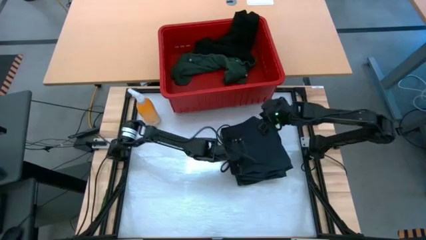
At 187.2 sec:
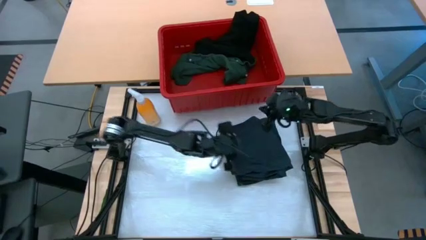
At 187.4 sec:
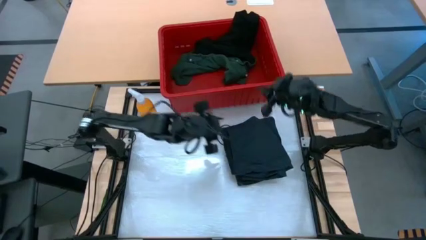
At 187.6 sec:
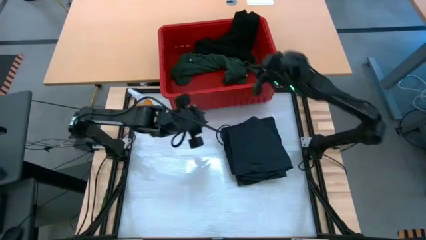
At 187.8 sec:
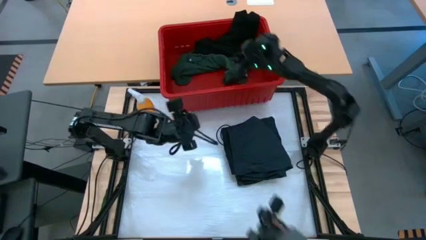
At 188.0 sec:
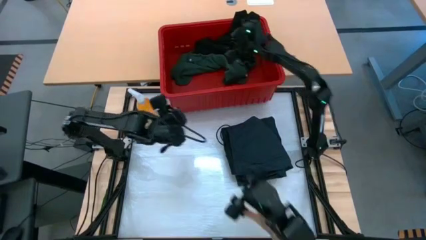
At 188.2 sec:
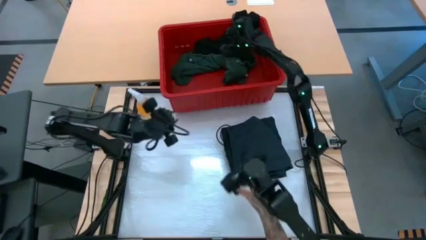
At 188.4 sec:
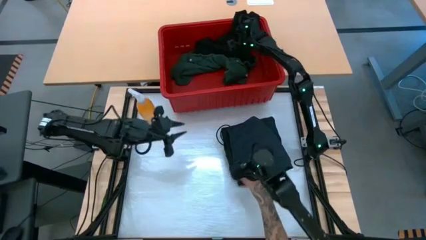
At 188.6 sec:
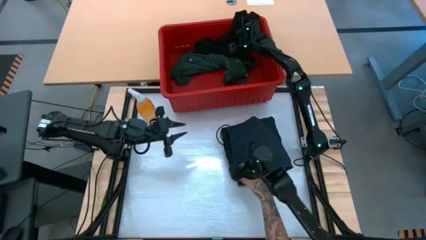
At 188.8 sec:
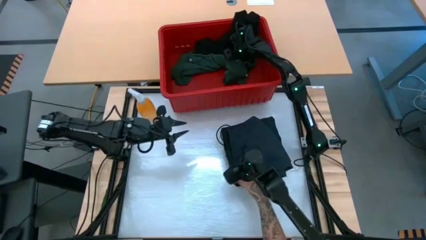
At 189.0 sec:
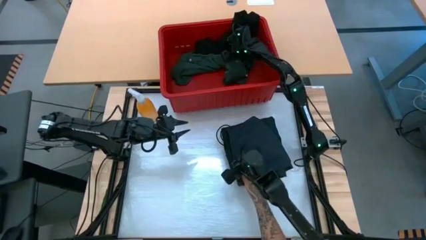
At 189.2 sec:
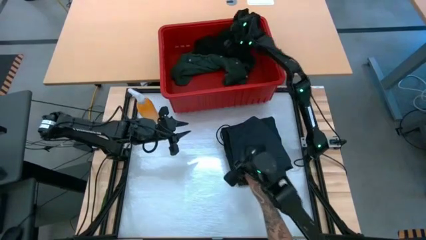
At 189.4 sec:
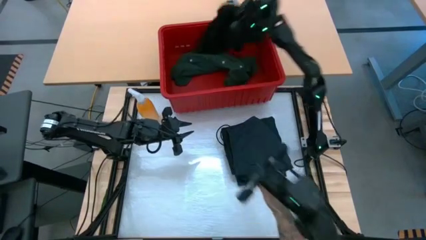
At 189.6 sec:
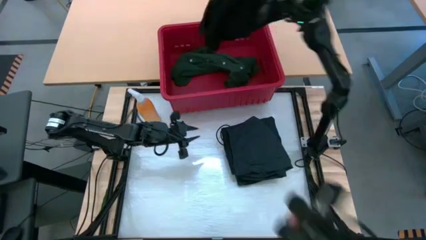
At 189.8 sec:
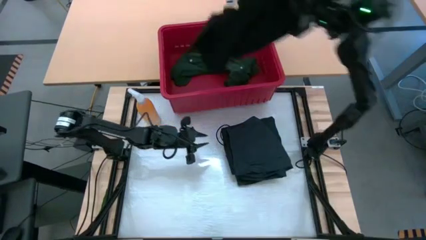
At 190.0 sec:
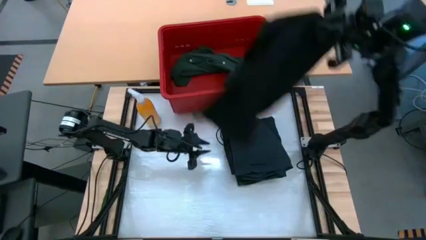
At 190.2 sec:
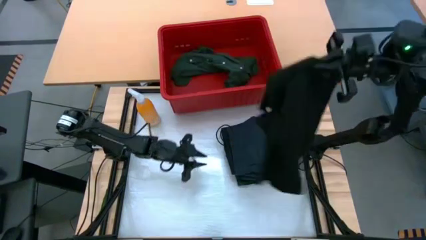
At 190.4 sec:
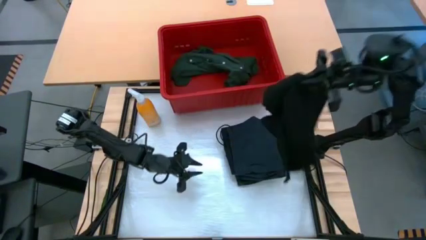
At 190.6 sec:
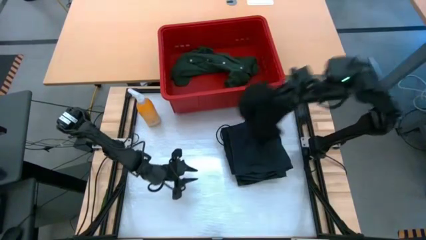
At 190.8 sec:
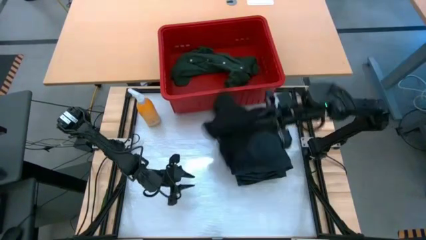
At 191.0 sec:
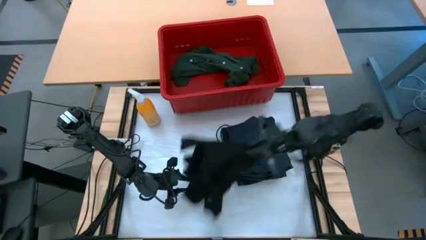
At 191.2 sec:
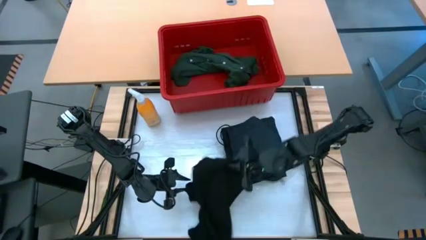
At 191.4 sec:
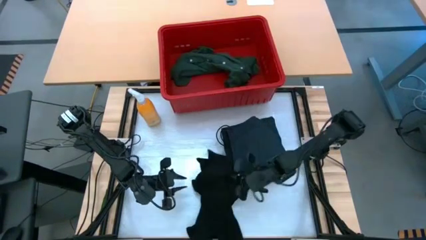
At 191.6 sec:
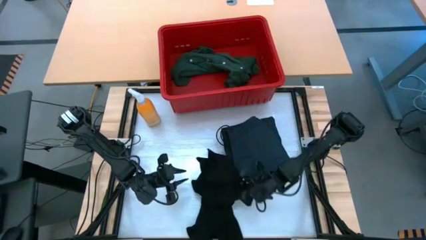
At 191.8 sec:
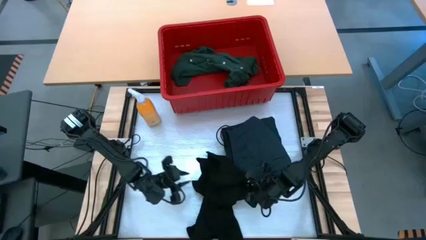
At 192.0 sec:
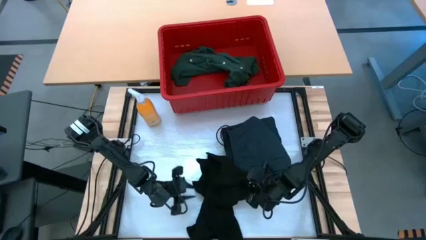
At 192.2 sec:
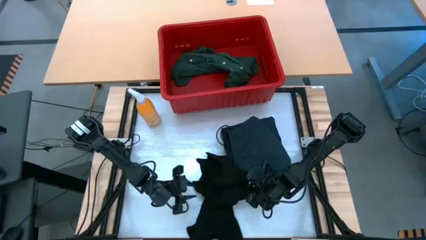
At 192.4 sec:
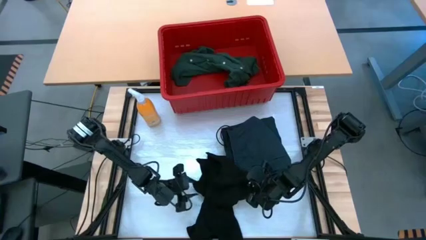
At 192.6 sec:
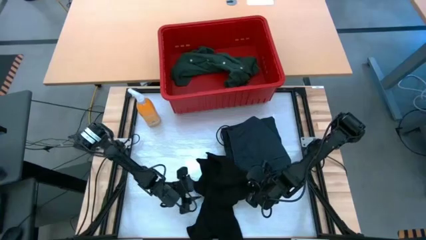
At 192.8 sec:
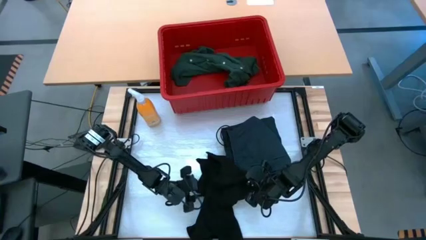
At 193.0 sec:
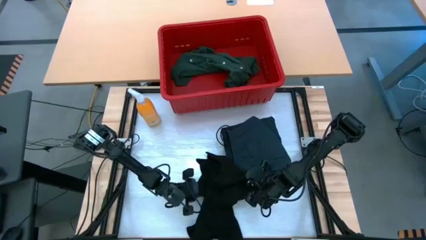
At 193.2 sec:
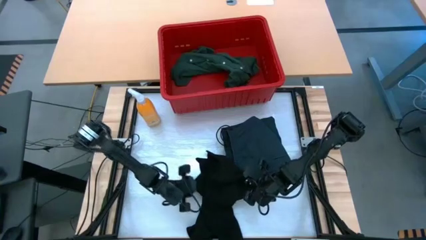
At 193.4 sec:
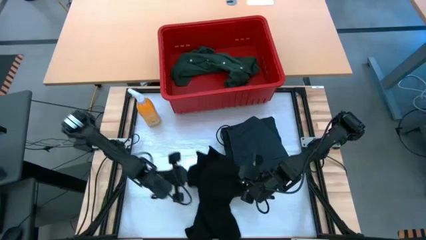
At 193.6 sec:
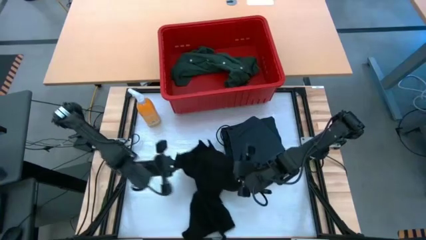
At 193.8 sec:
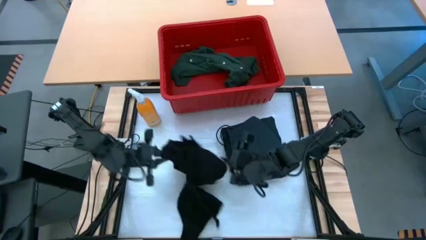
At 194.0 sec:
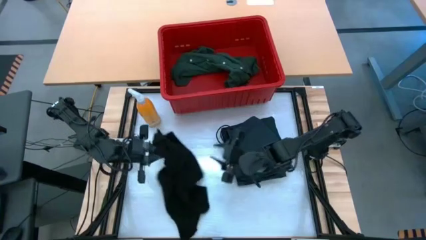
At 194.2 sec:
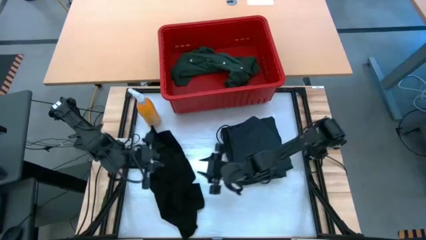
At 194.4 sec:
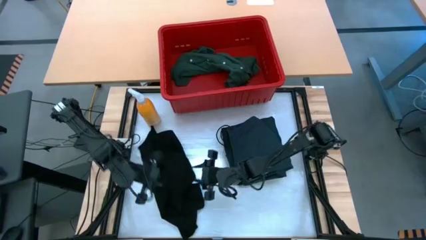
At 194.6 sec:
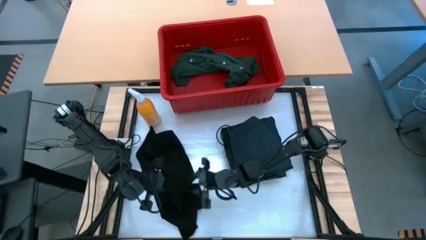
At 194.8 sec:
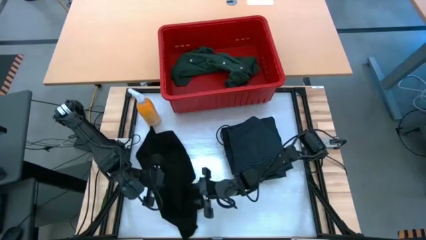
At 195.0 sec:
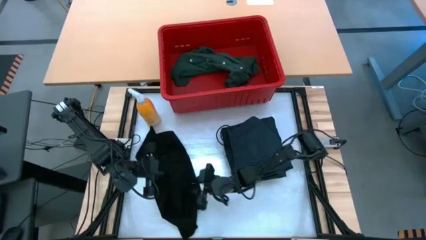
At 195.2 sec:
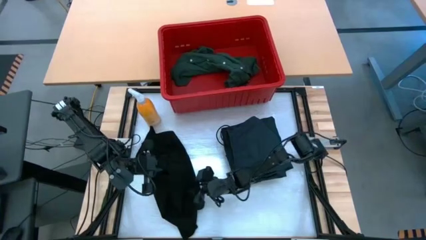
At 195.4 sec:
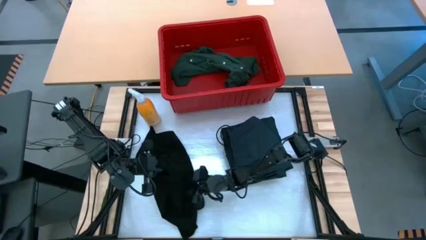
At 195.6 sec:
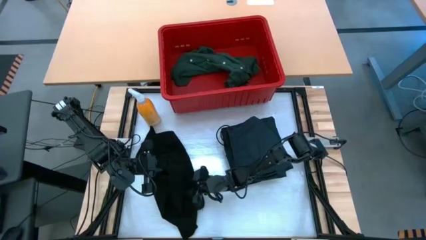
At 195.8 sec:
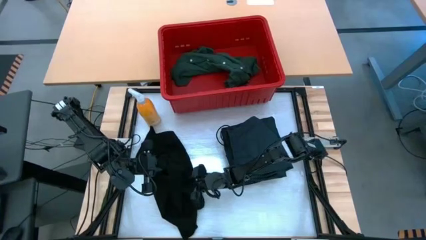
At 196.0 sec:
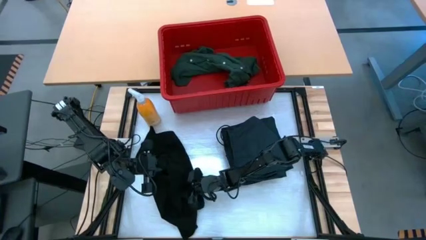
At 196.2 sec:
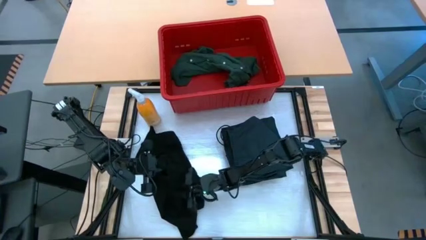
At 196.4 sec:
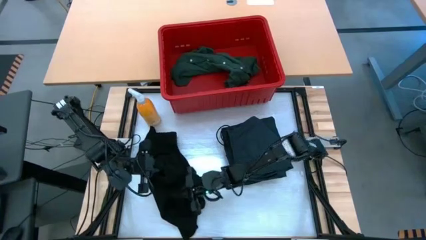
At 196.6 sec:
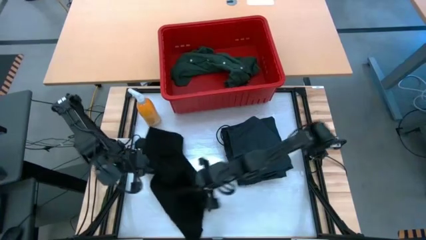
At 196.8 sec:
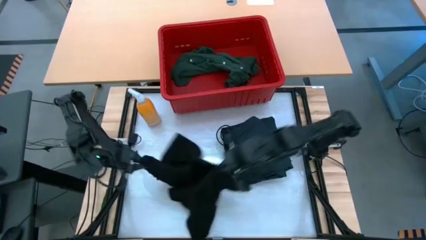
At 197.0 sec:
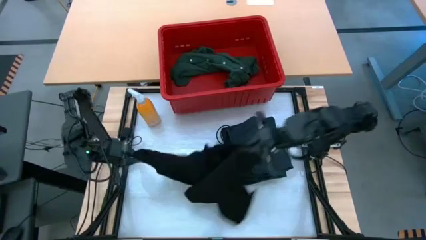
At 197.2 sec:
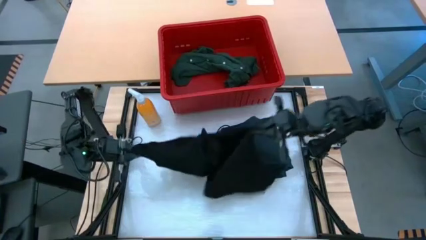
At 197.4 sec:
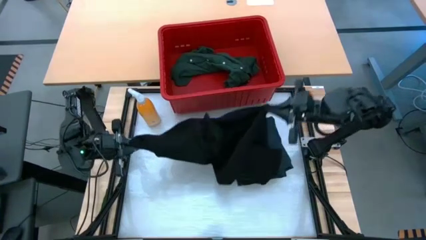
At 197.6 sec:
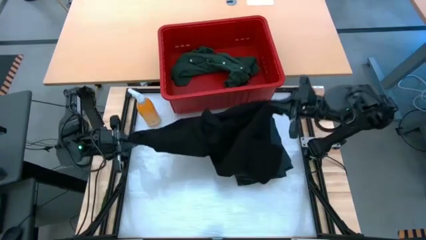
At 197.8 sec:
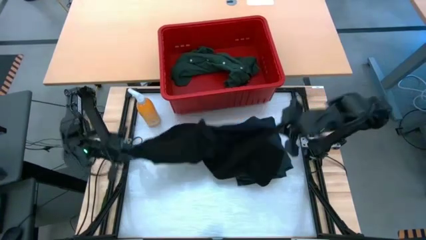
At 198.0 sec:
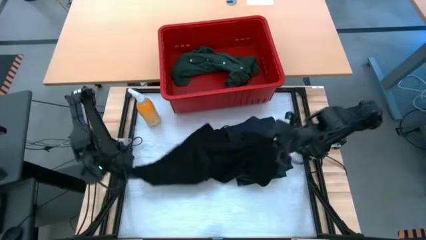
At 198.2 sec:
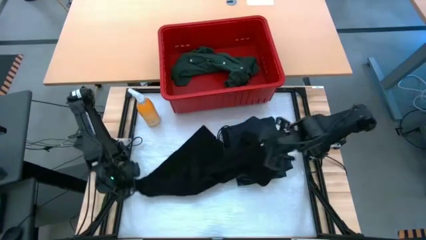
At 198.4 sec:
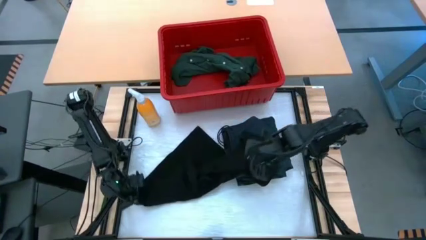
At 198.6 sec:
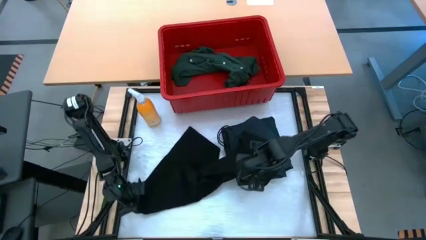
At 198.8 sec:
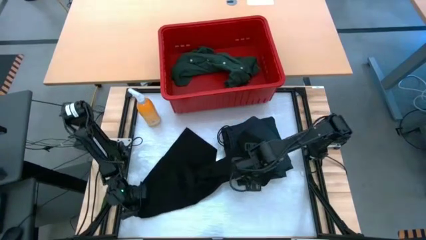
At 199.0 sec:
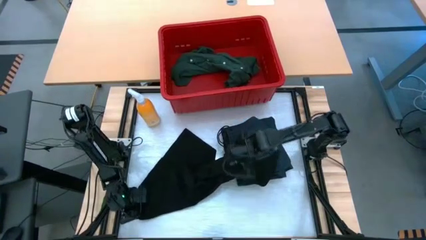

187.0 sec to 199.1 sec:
Task: Fold Laundry from Bin
Fold the black shirt
